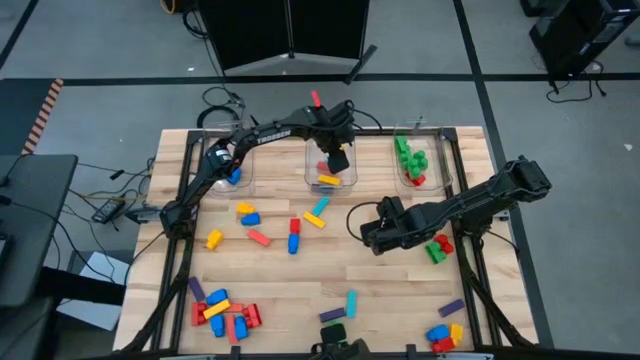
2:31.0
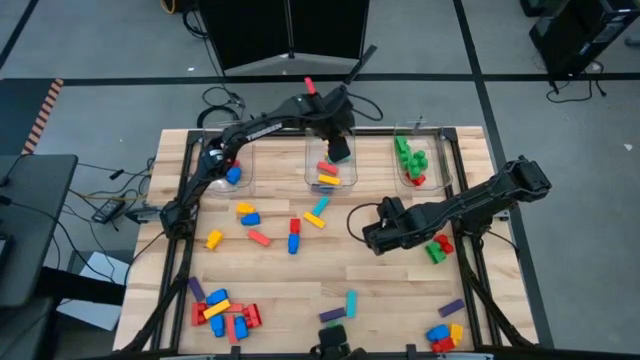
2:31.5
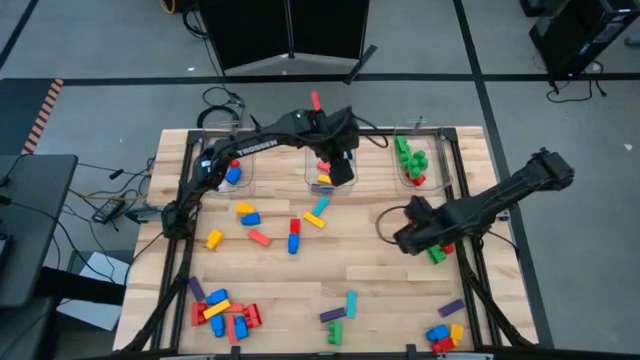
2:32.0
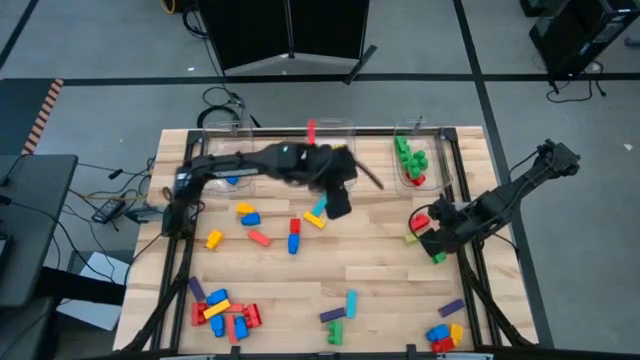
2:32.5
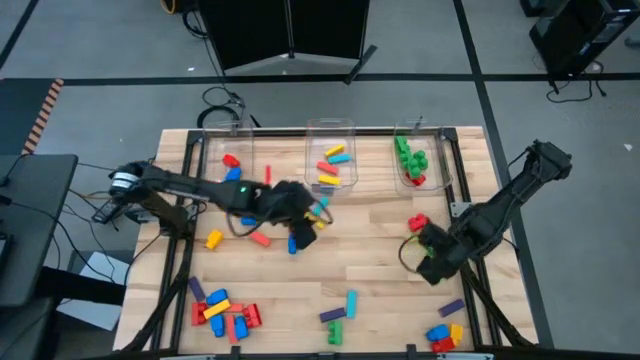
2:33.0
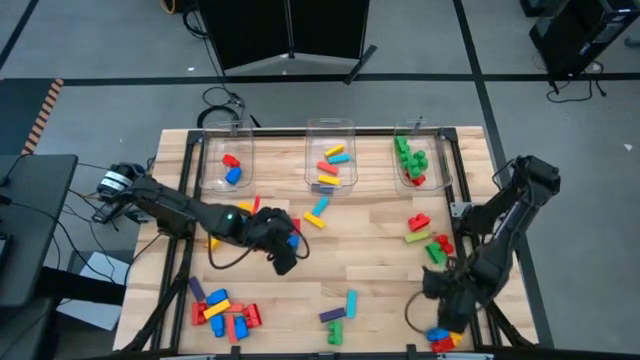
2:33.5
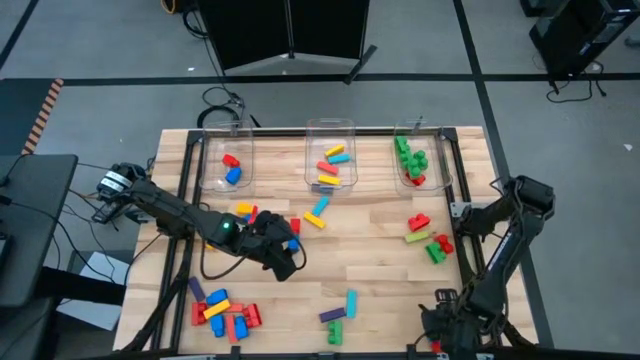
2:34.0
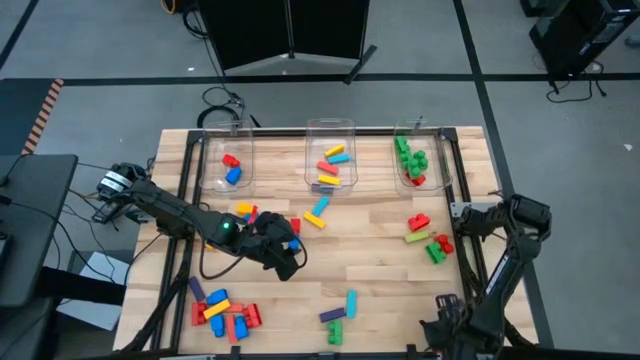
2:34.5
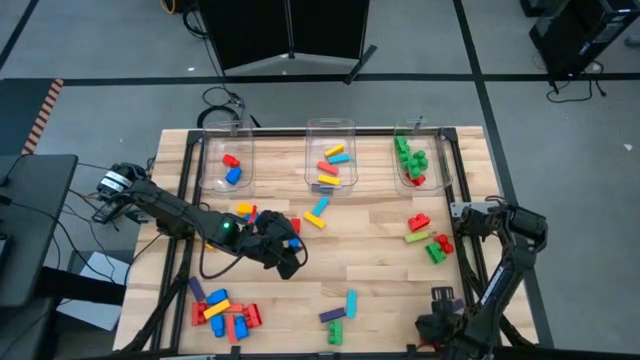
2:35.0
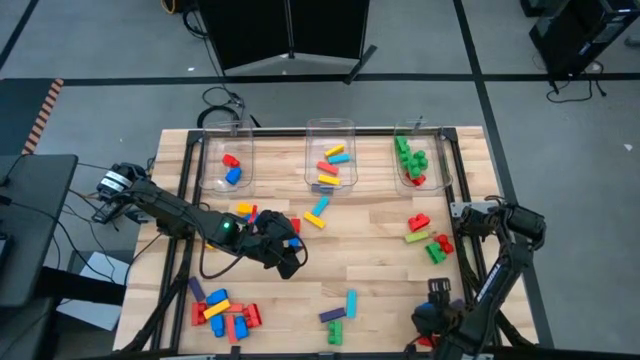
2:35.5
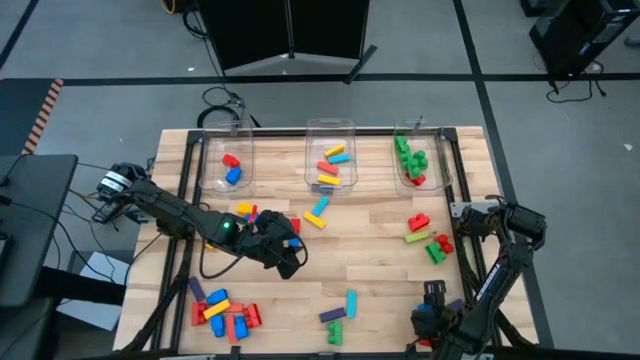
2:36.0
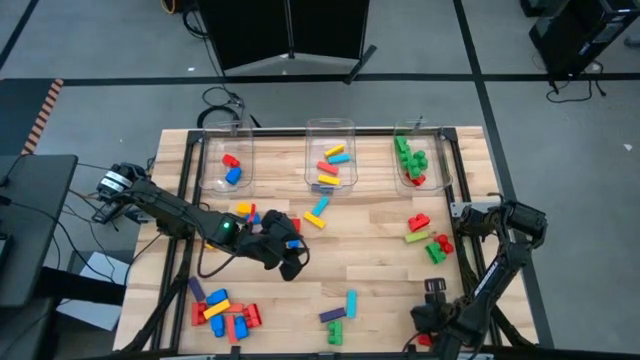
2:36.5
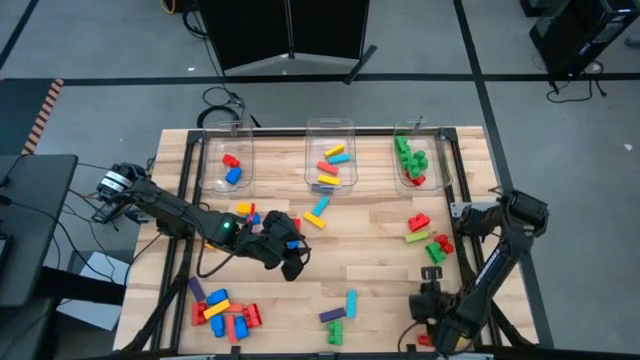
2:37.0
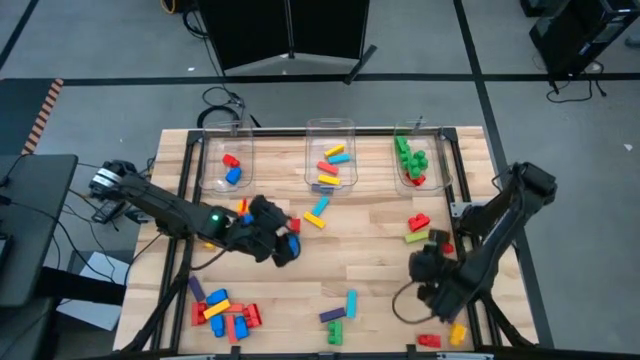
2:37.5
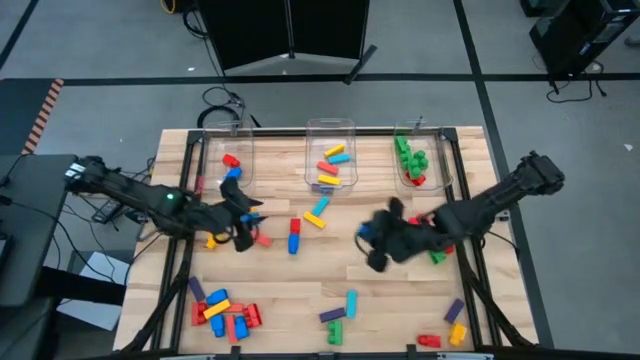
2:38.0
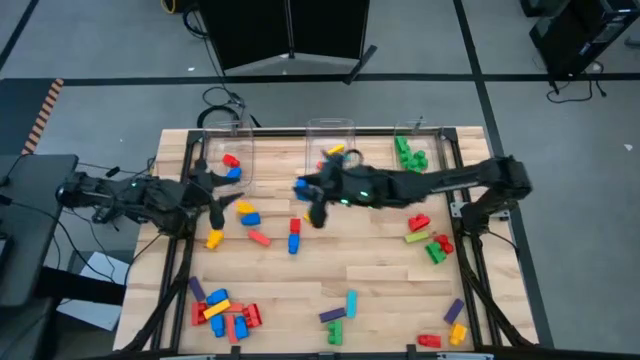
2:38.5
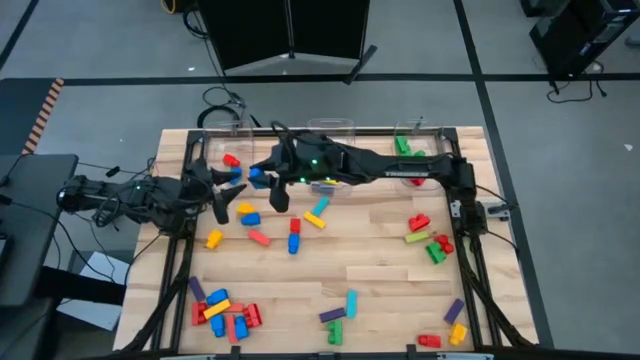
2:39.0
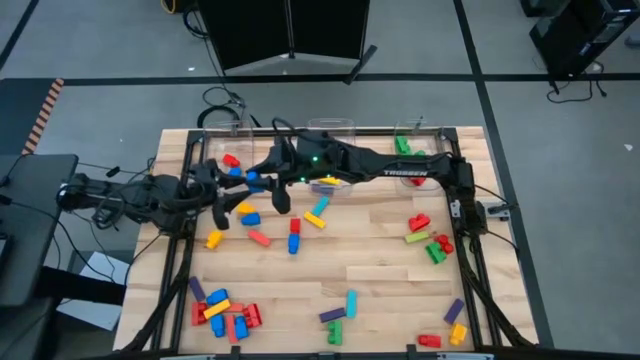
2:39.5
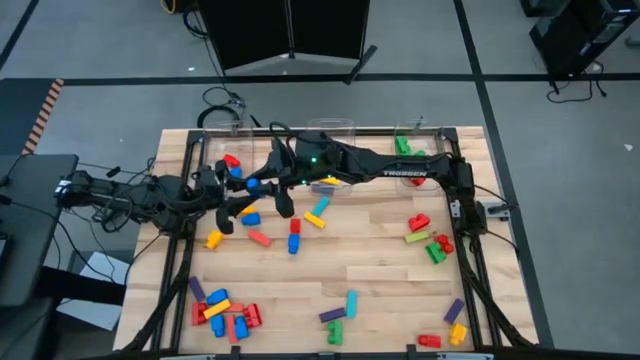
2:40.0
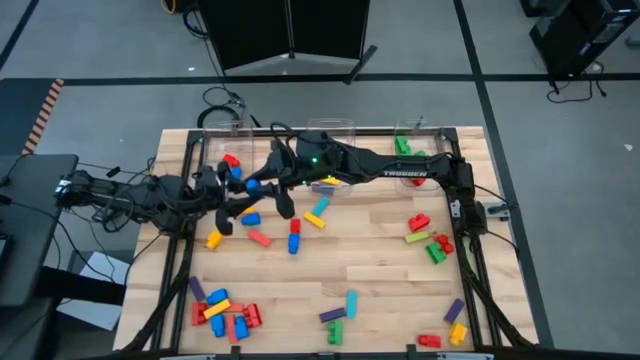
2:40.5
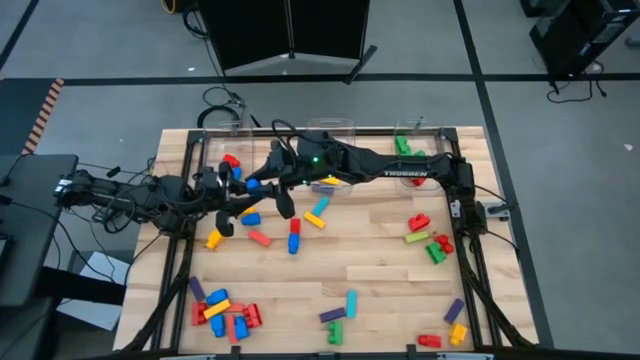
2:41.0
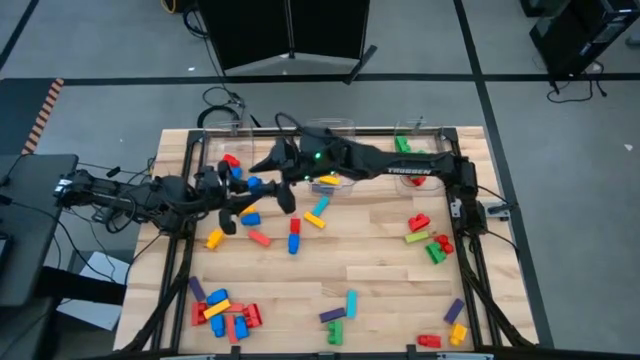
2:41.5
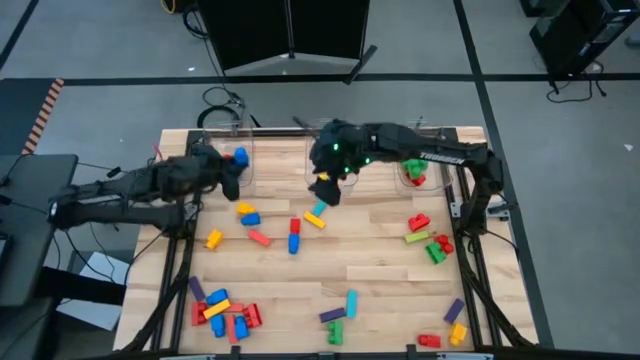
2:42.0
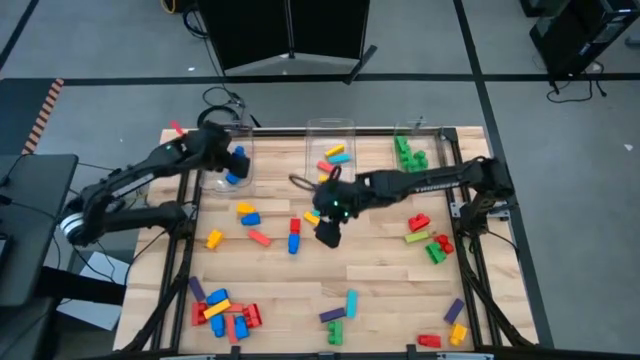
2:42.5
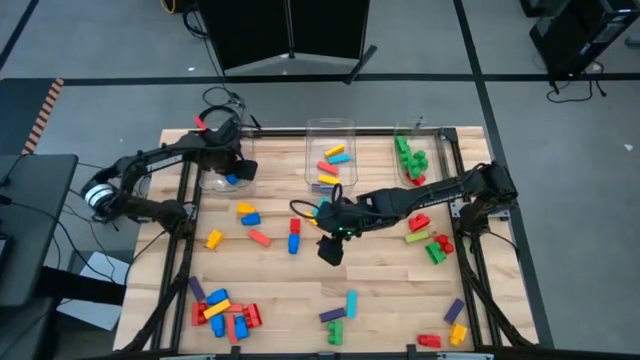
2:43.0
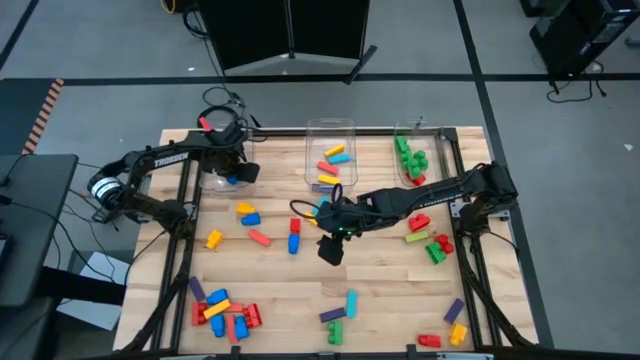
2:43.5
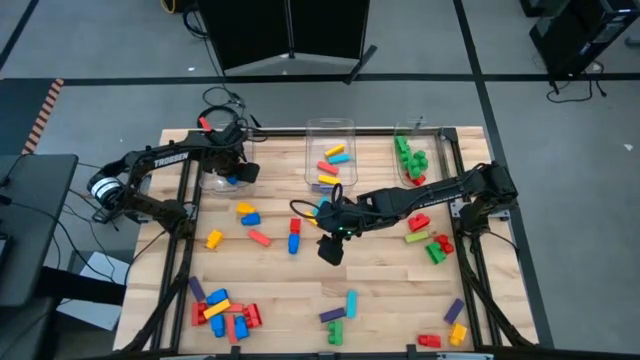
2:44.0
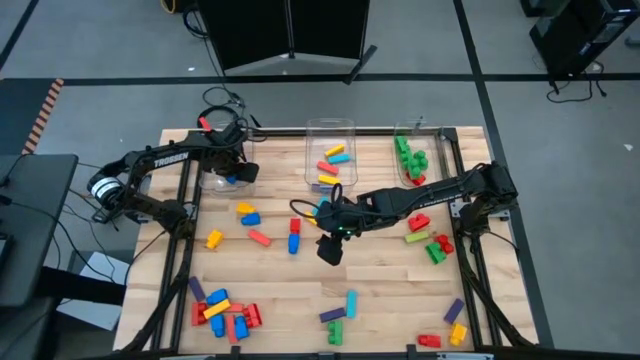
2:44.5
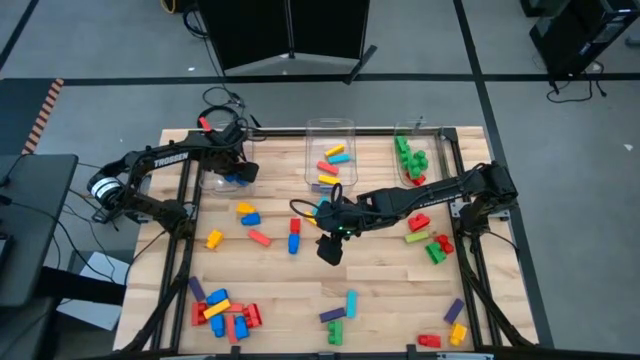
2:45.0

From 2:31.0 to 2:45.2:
Task: Sort blocks by size
Put the blue 1 stud game piece into the left transparent bin

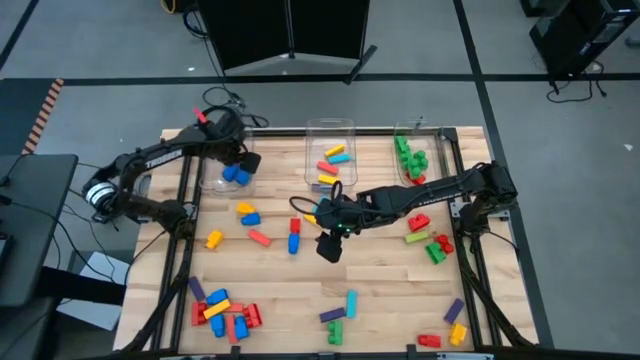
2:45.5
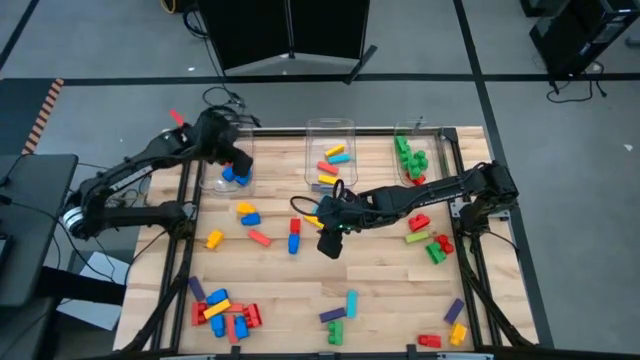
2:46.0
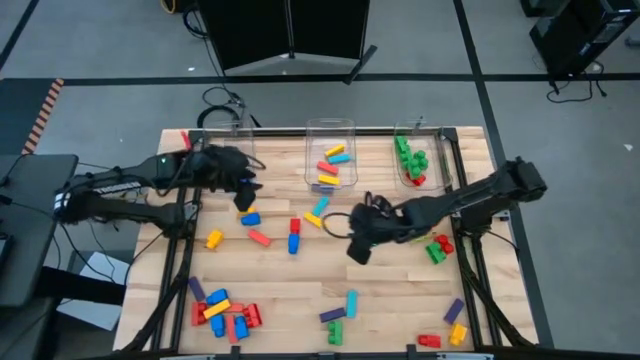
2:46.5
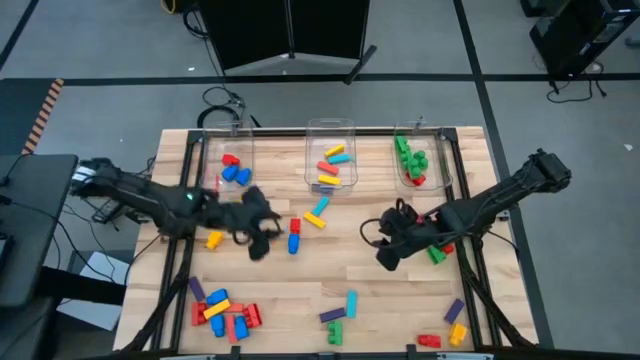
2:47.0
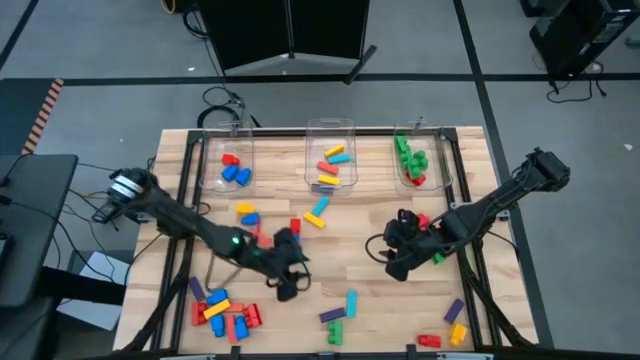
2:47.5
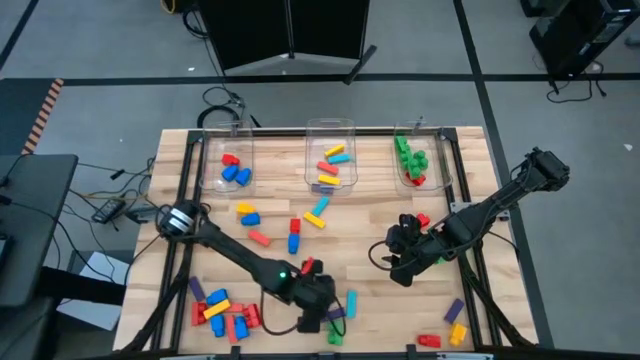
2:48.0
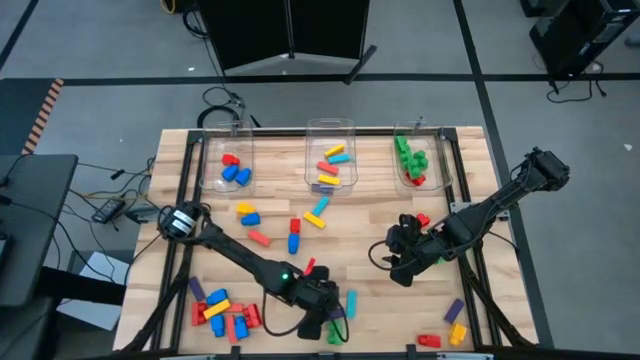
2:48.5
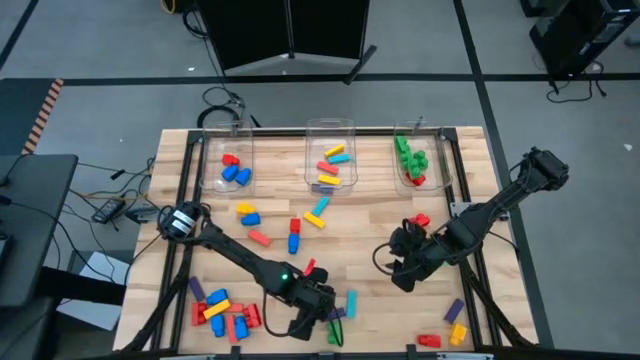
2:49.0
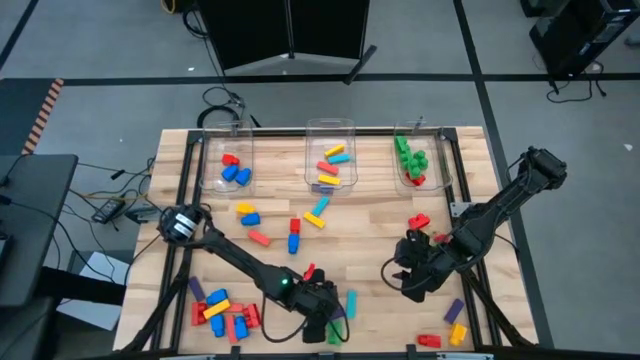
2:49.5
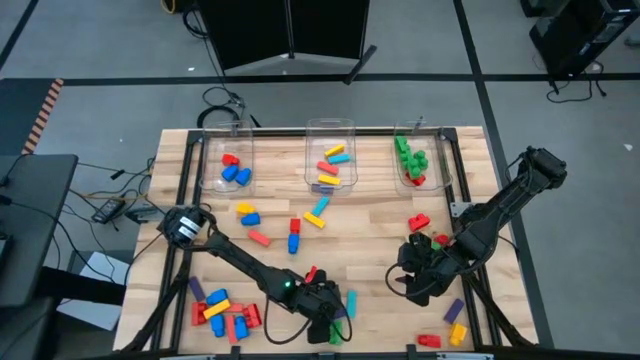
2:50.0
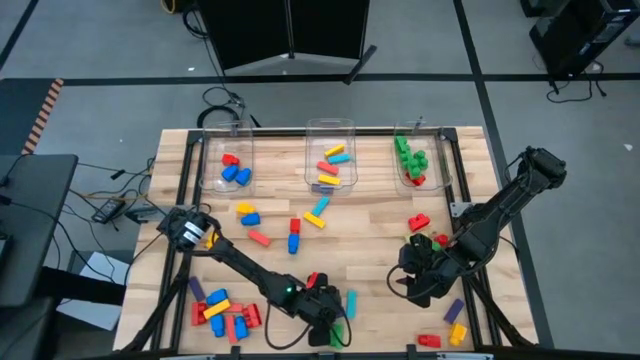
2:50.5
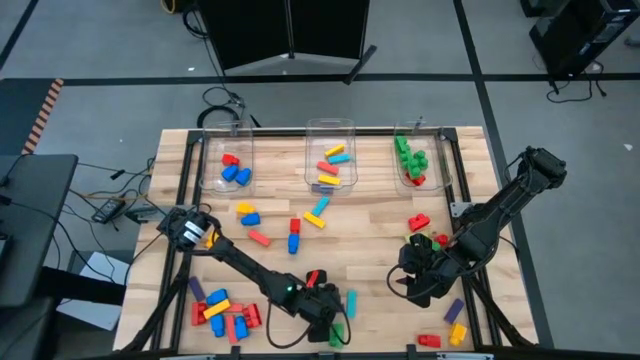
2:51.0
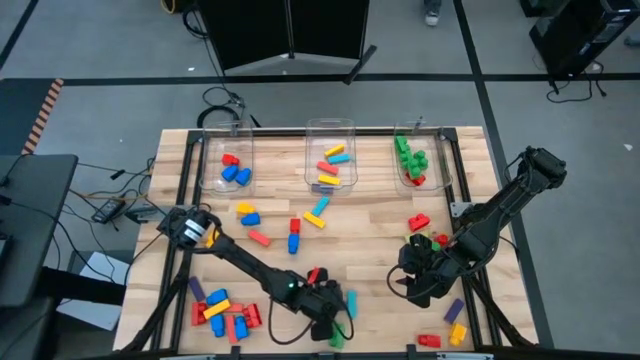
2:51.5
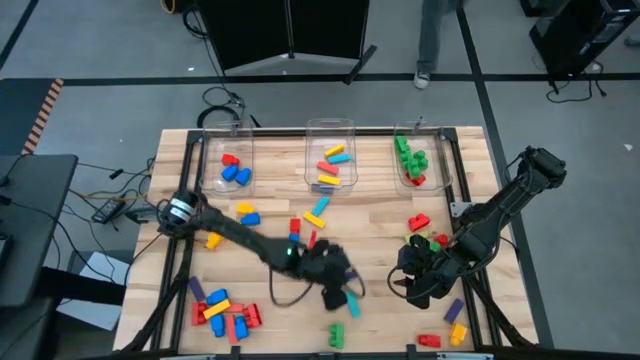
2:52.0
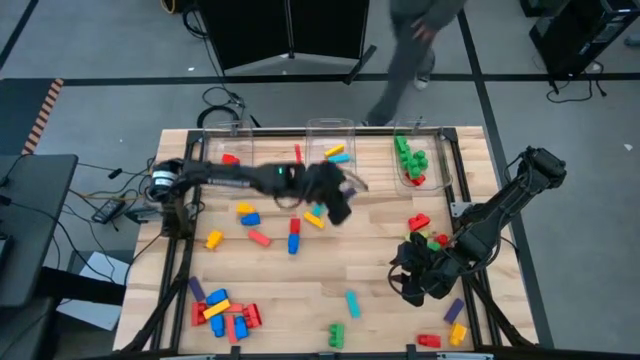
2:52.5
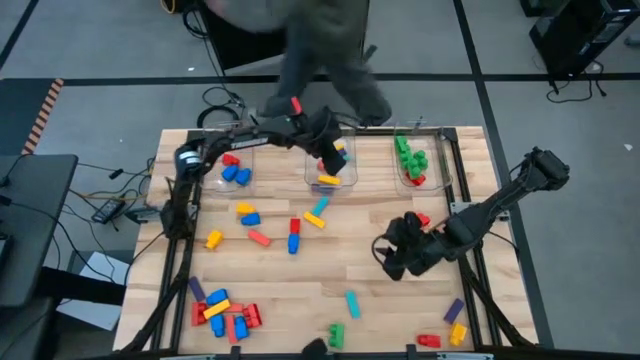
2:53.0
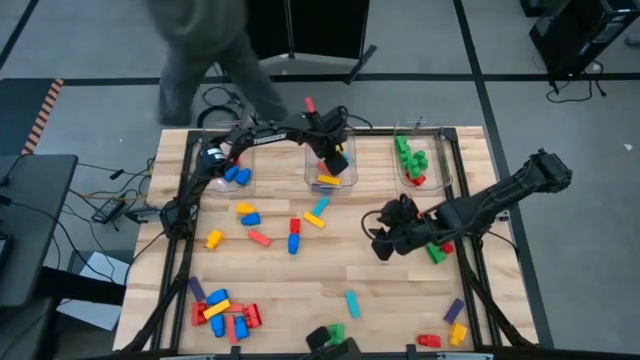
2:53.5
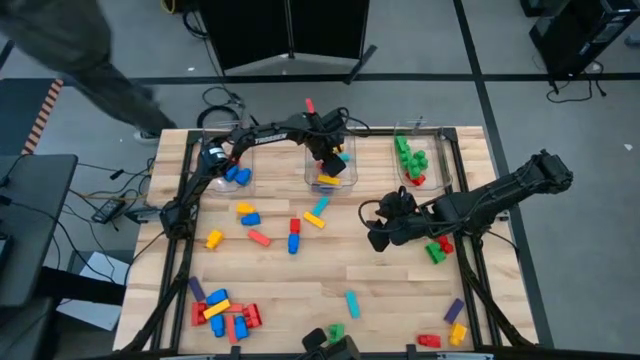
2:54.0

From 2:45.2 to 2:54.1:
Put the purple block into the middle transparent bin
